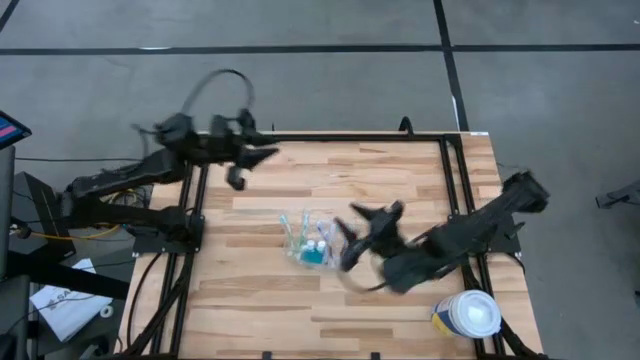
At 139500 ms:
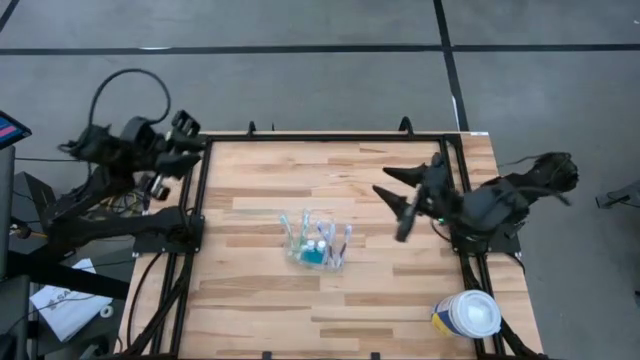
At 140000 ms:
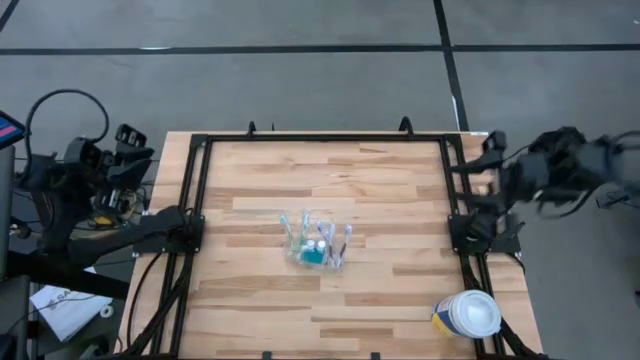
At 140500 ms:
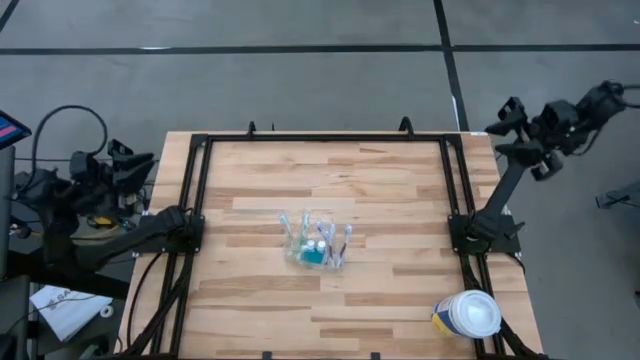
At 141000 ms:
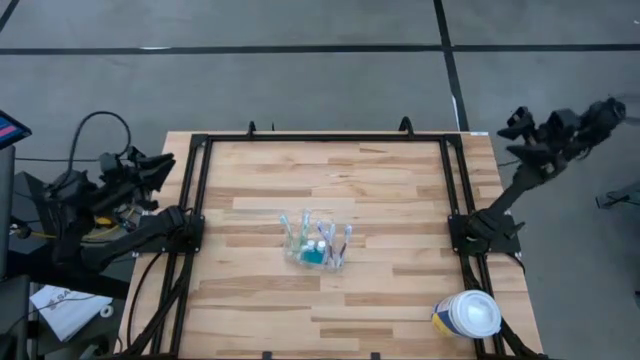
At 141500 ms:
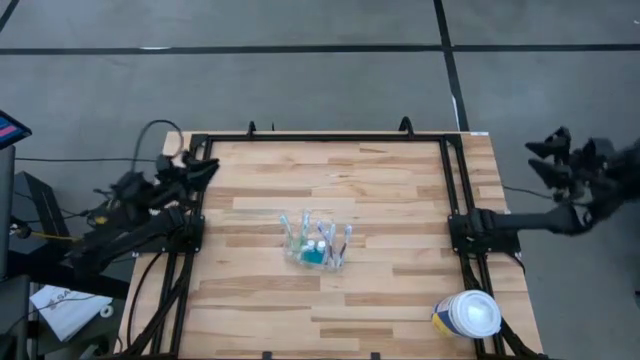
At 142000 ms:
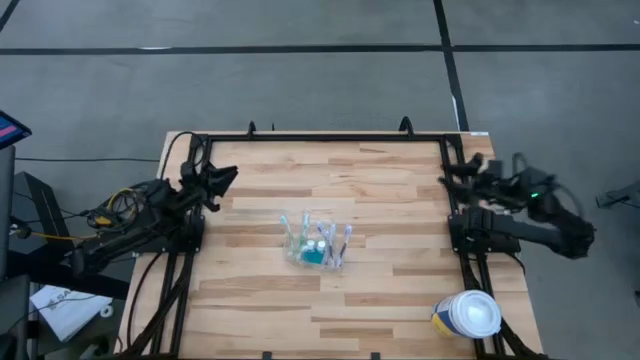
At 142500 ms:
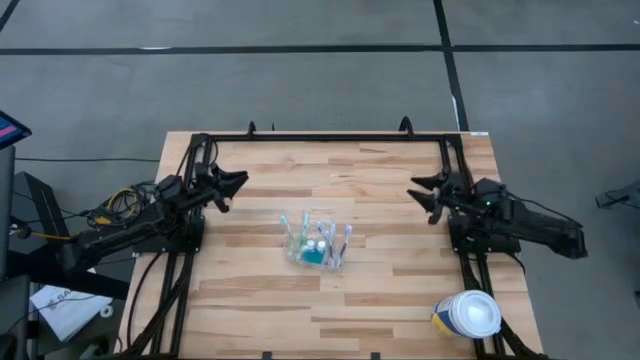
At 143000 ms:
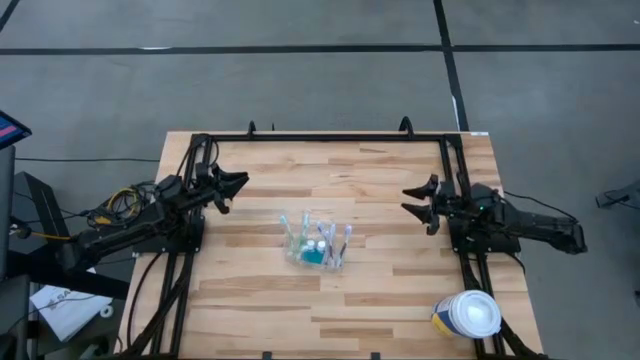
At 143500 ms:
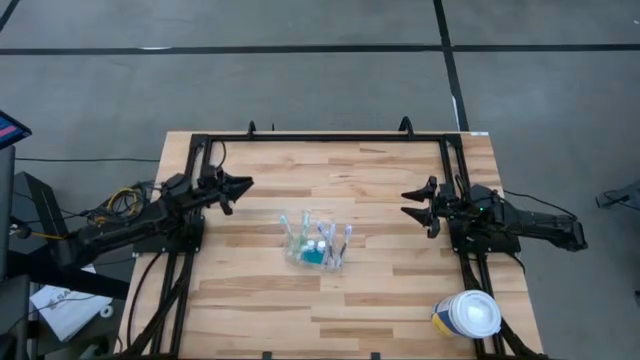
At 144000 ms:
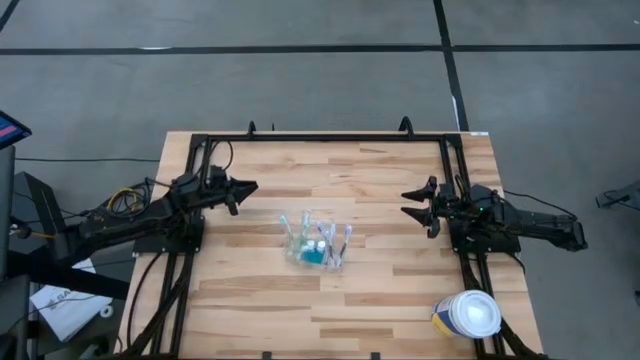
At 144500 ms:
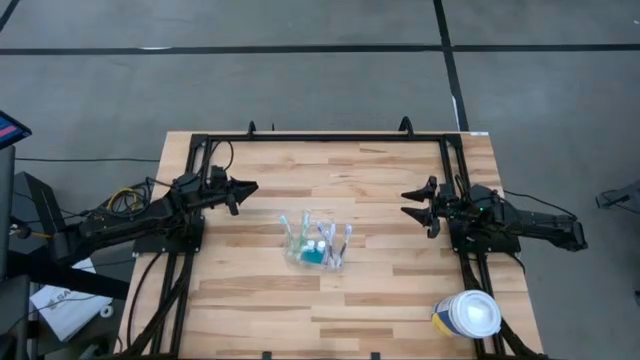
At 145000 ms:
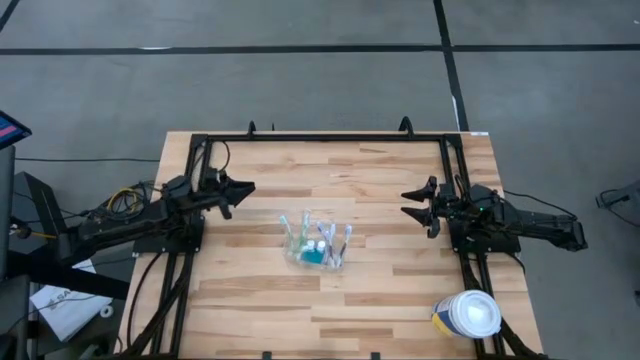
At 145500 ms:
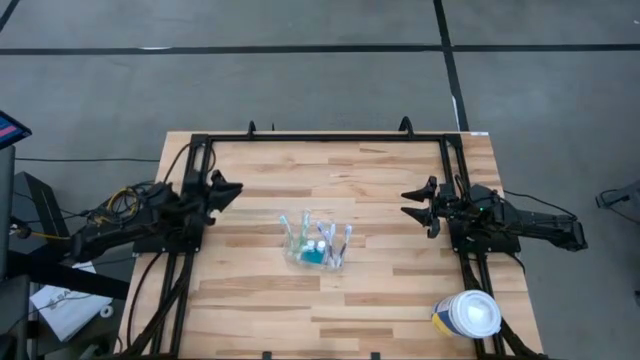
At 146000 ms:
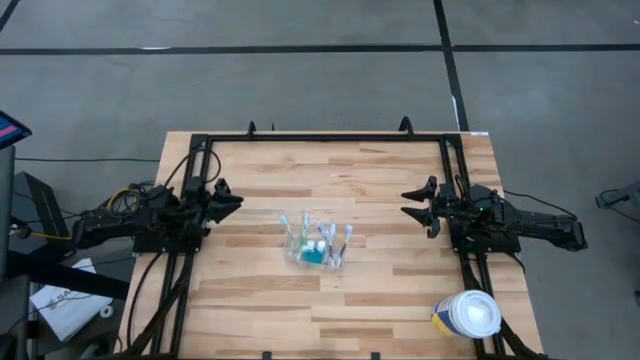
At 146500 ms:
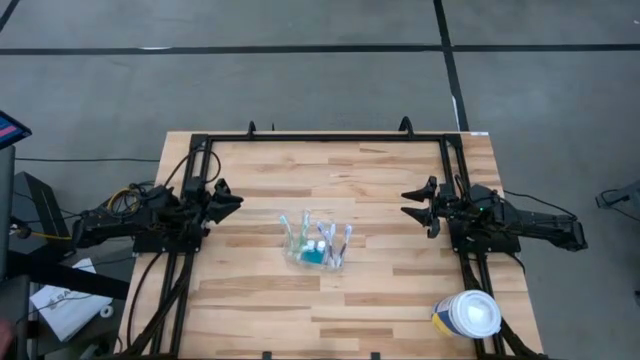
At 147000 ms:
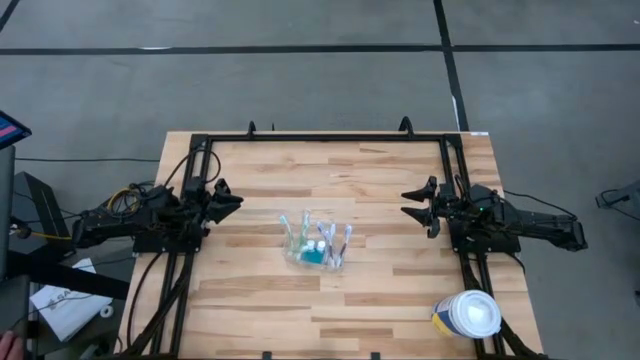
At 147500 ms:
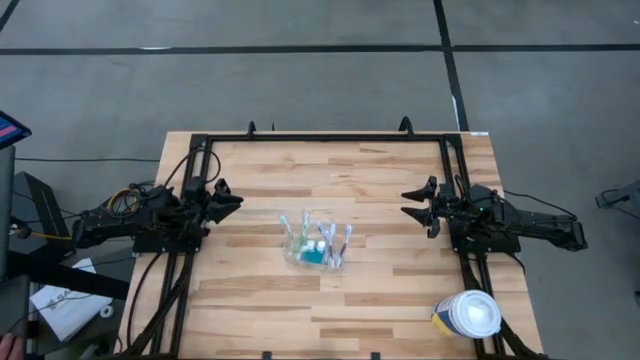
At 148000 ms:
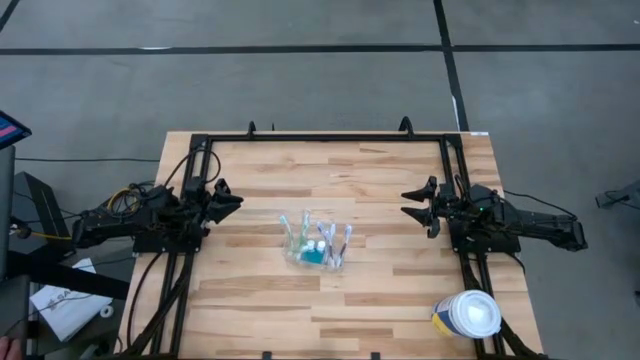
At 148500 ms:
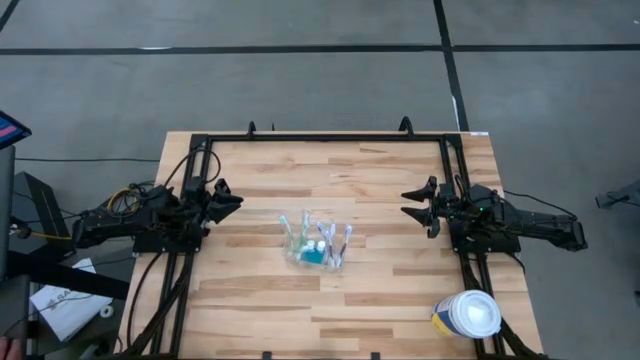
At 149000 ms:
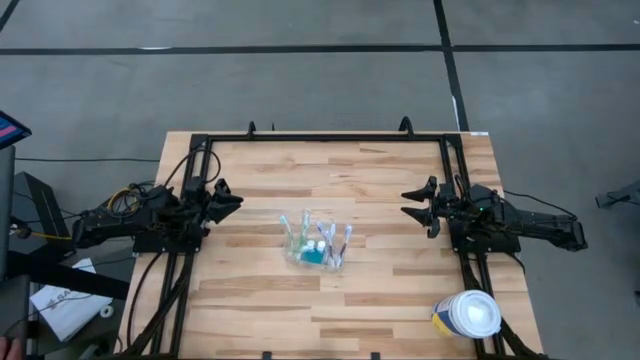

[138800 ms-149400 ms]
Task: Pick & Place toothbrushing station
Return to Home Position

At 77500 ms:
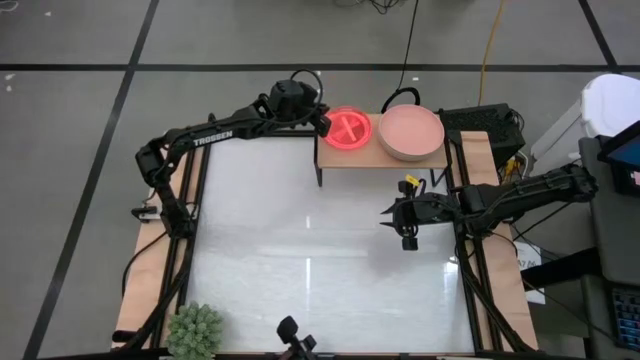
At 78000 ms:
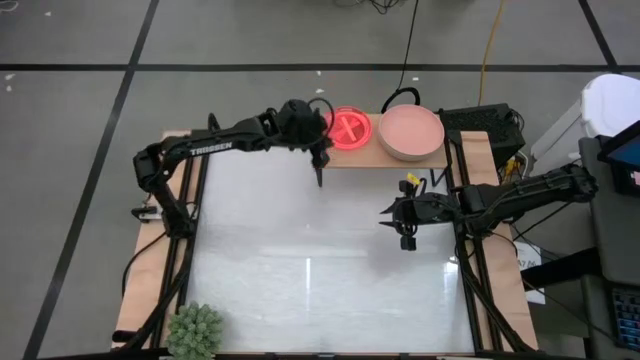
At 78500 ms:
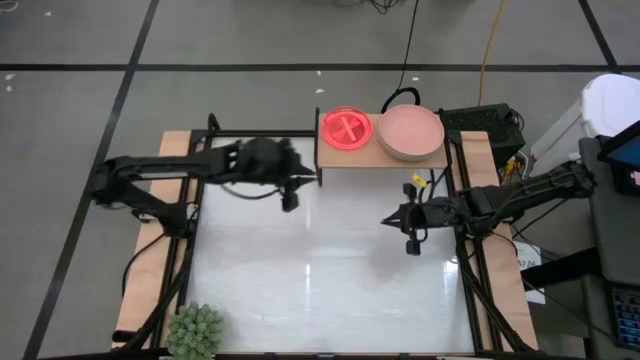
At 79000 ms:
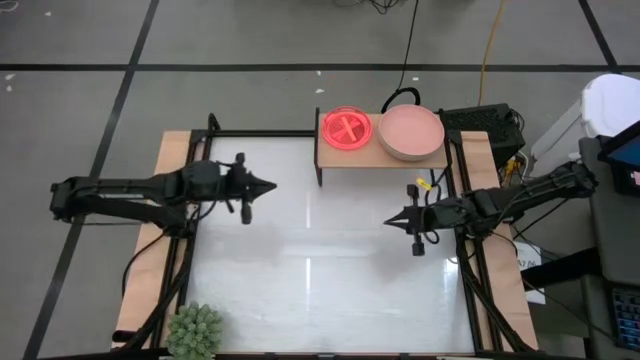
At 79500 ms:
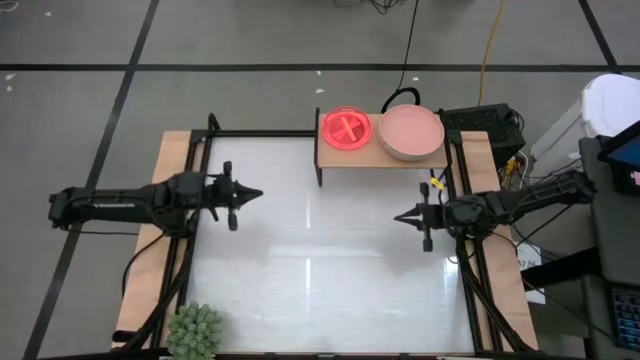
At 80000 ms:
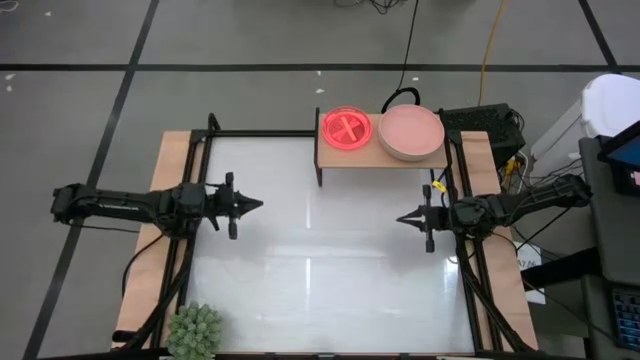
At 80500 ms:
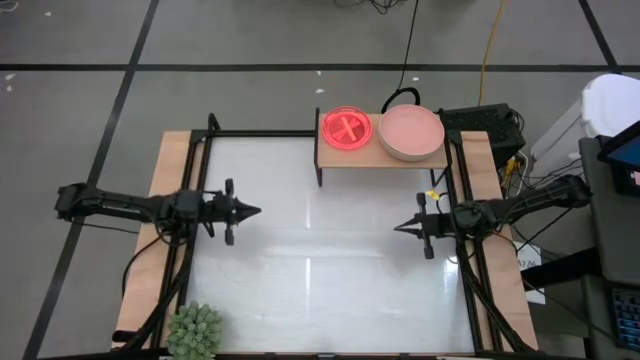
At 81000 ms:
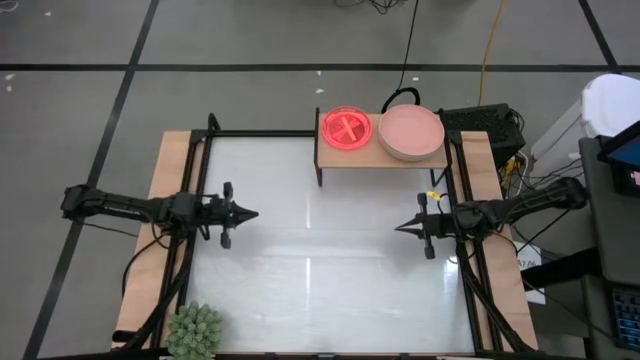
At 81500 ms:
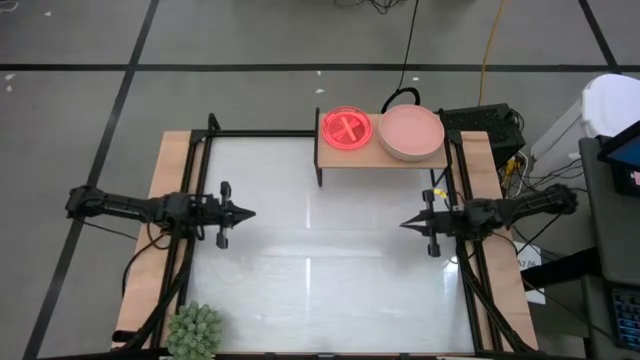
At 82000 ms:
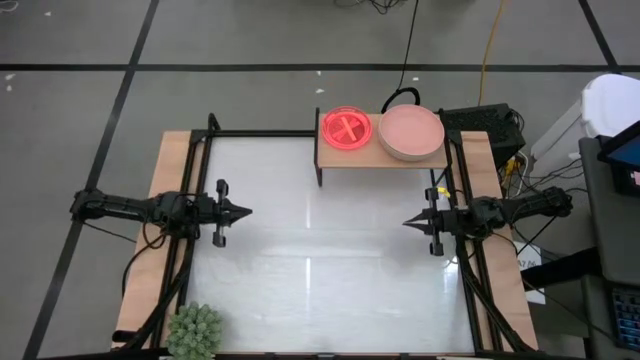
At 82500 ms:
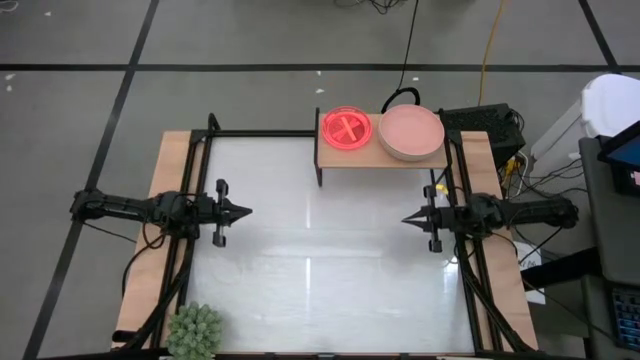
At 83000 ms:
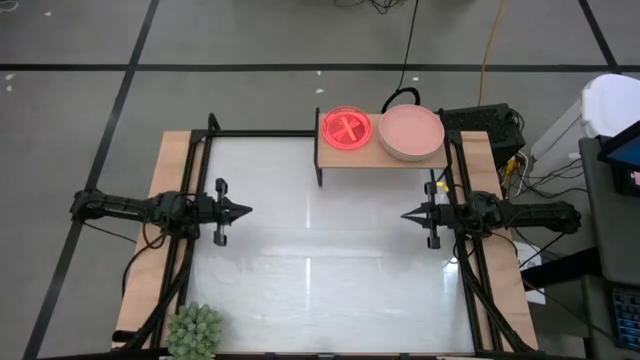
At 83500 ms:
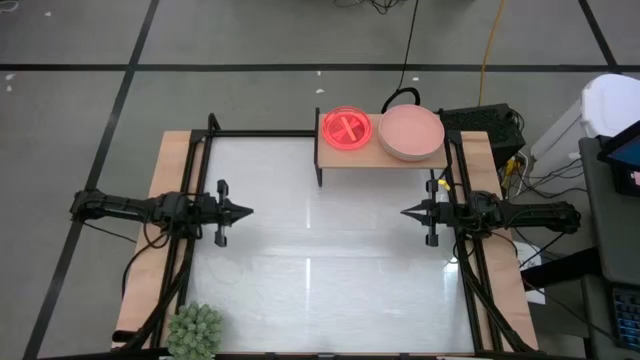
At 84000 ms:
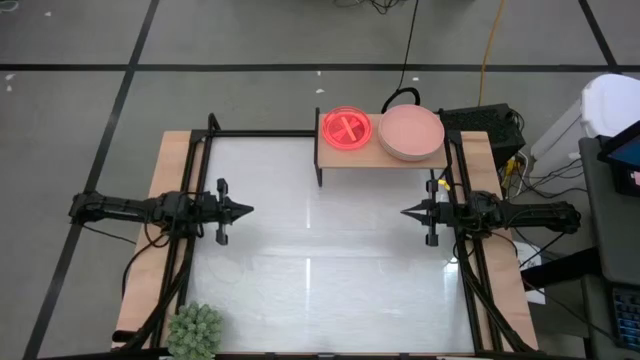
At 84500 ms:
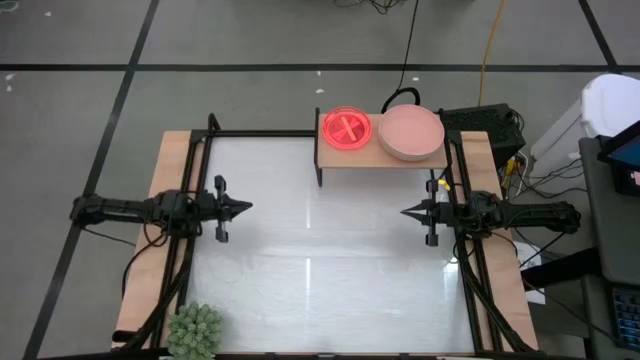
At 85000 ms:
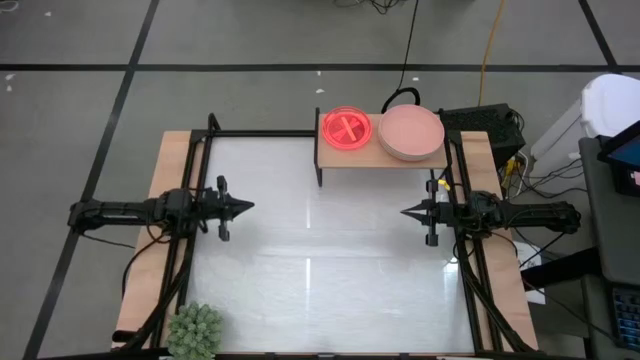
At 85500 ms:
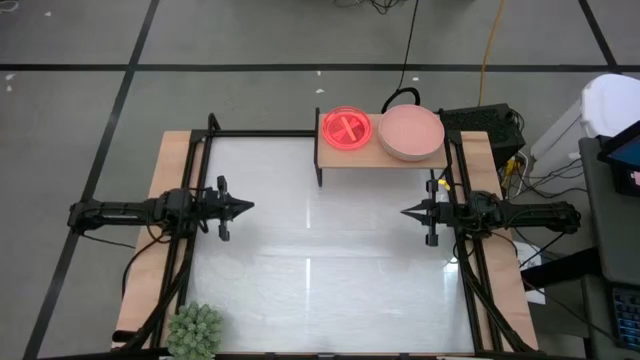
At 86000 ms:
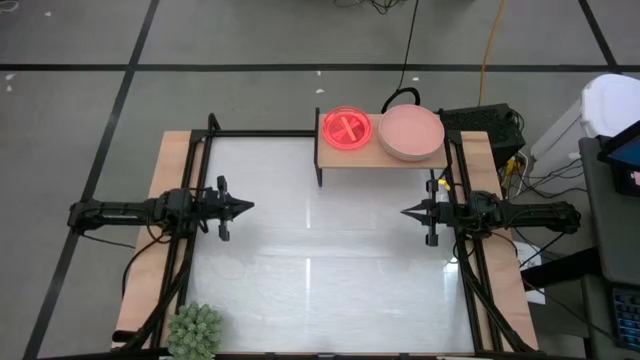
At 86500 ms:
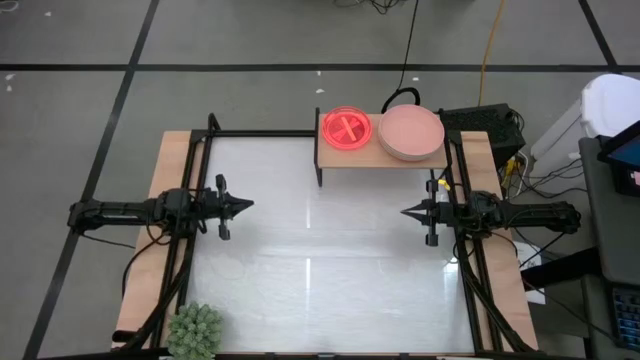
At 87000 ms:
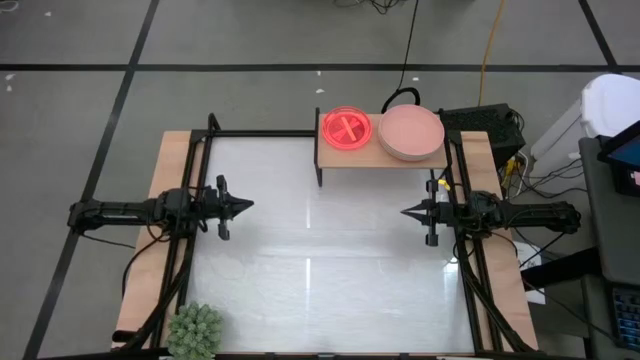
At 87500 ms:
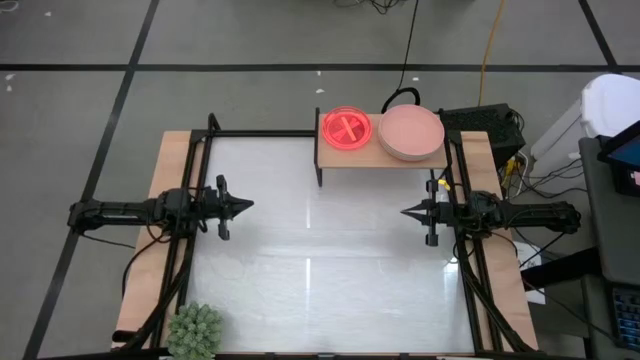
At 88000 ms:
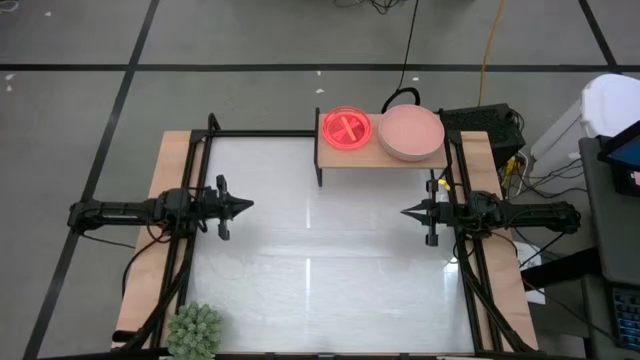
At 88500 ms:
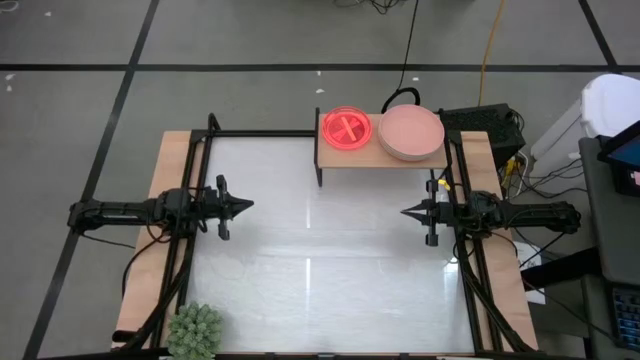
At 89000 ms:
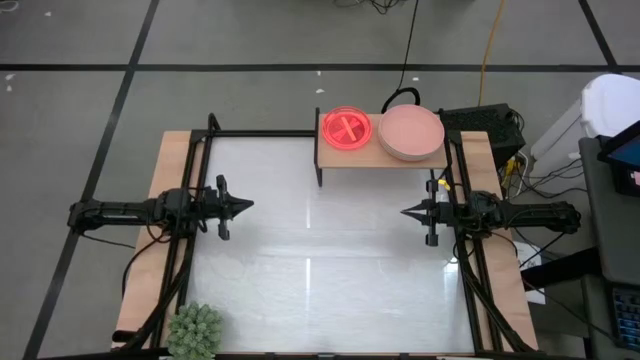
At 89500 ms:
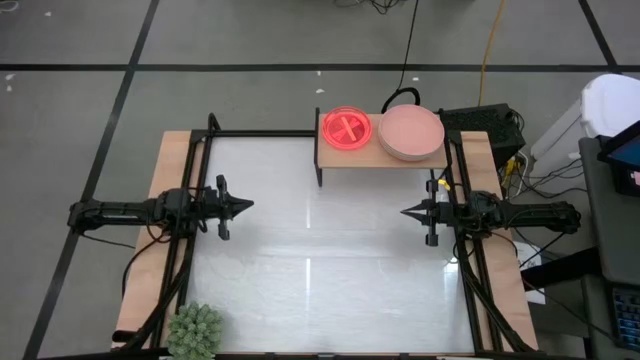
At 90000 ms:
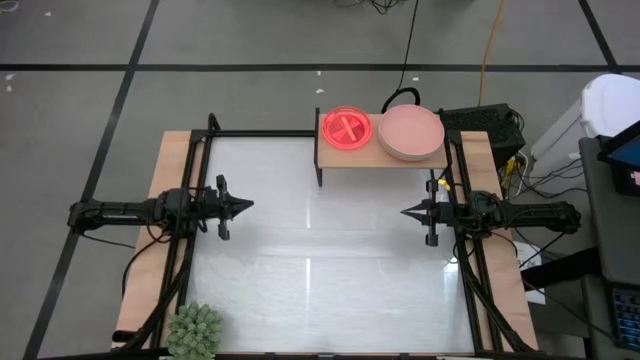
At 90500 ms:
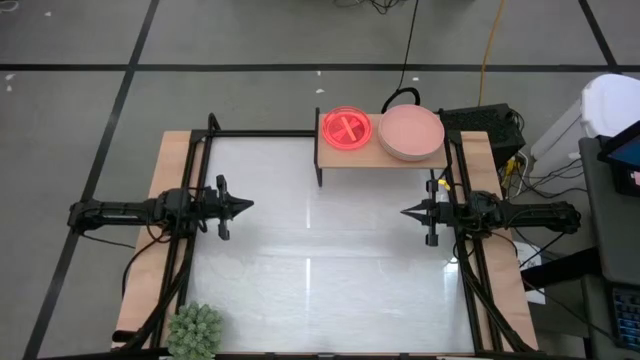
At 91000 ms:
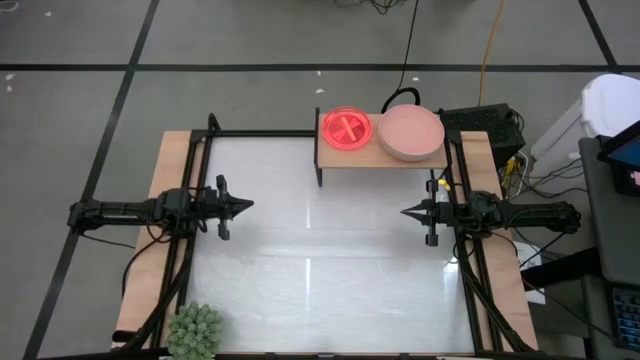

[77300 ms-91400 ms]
Task: Place and stack plates onto a shelf
Return to Home Position
